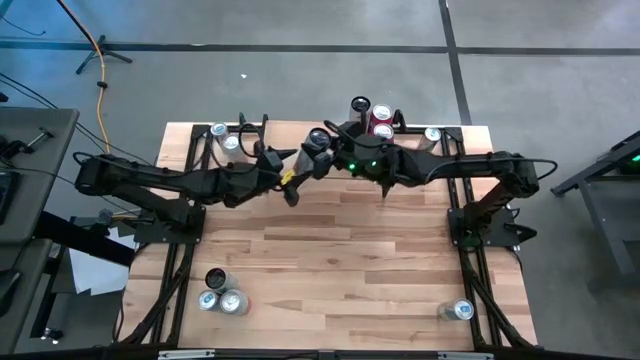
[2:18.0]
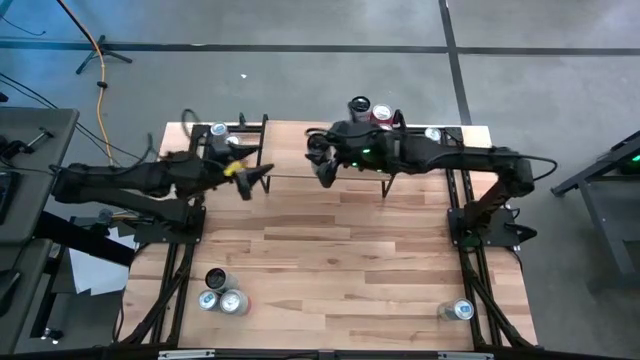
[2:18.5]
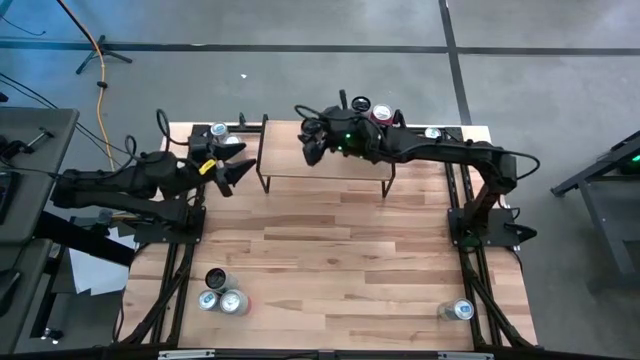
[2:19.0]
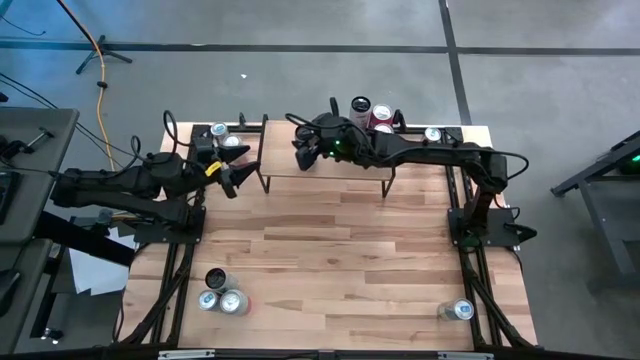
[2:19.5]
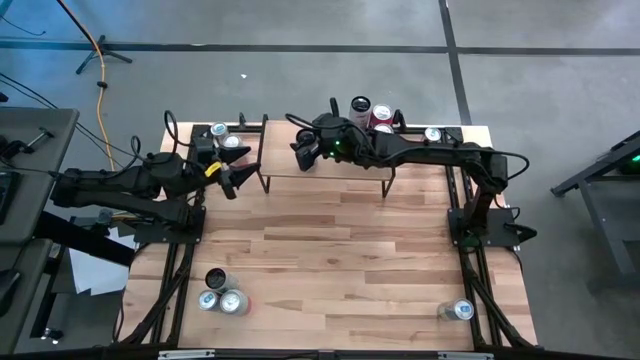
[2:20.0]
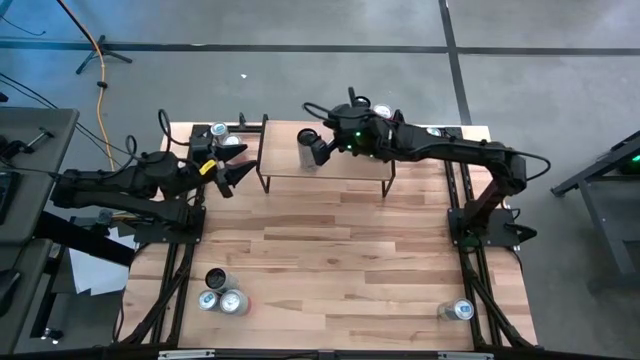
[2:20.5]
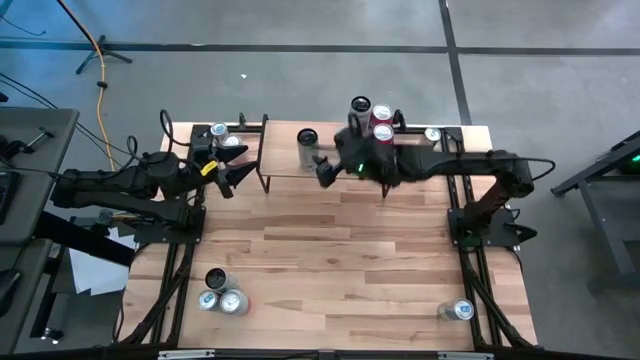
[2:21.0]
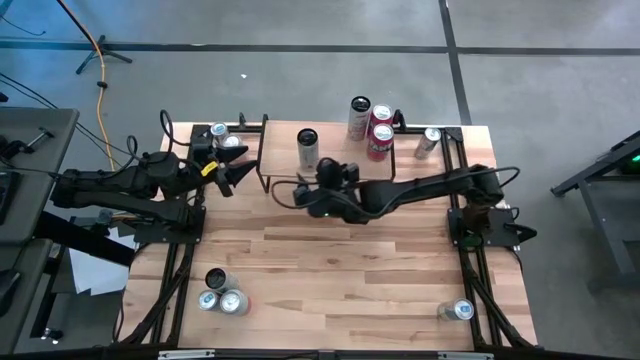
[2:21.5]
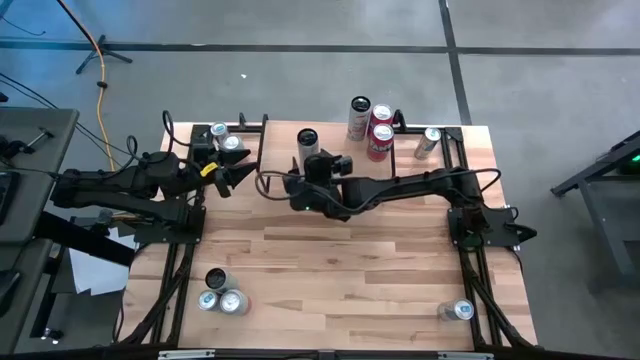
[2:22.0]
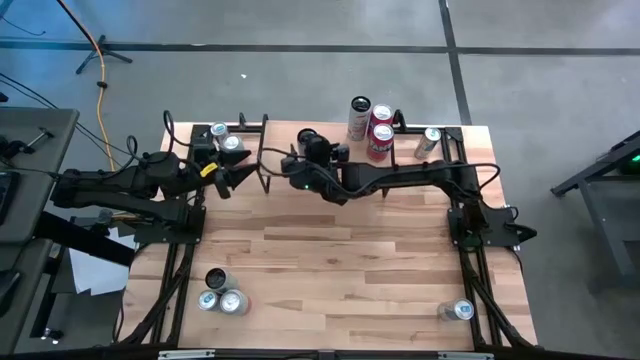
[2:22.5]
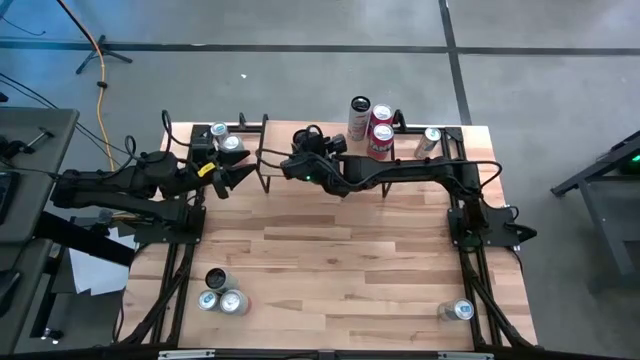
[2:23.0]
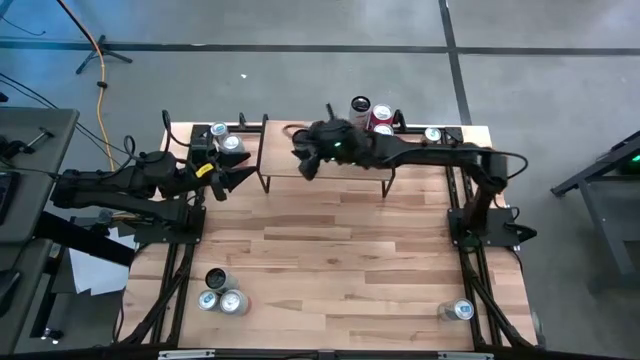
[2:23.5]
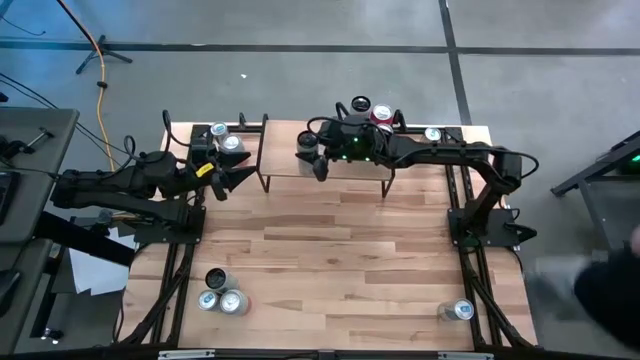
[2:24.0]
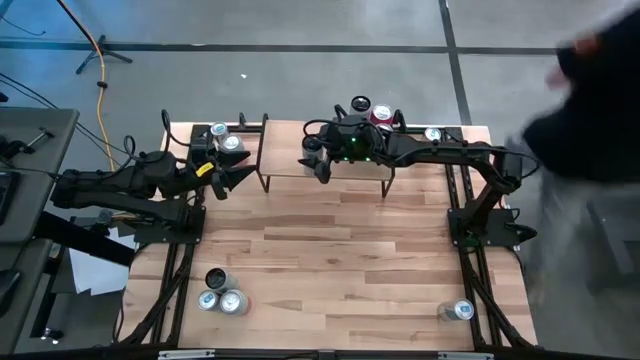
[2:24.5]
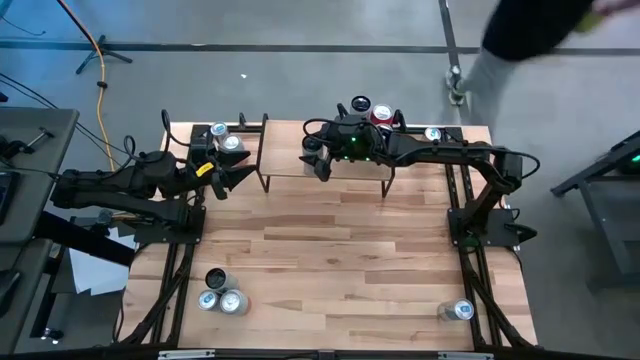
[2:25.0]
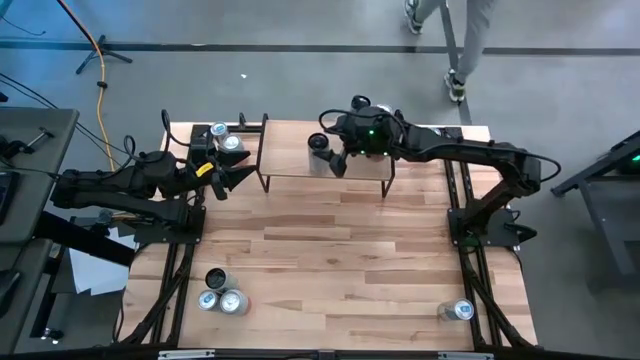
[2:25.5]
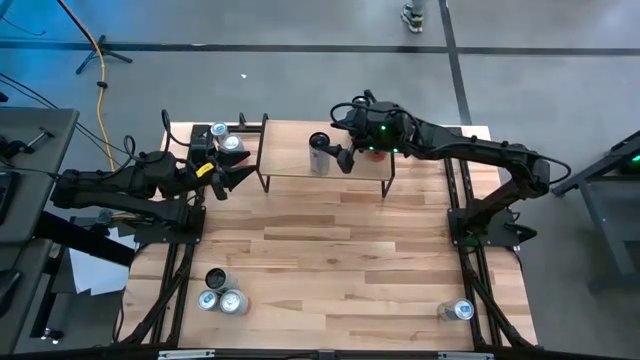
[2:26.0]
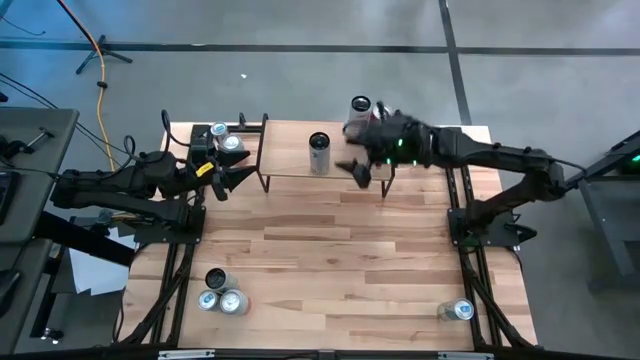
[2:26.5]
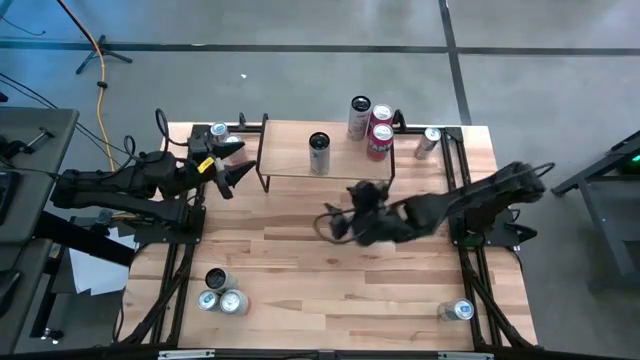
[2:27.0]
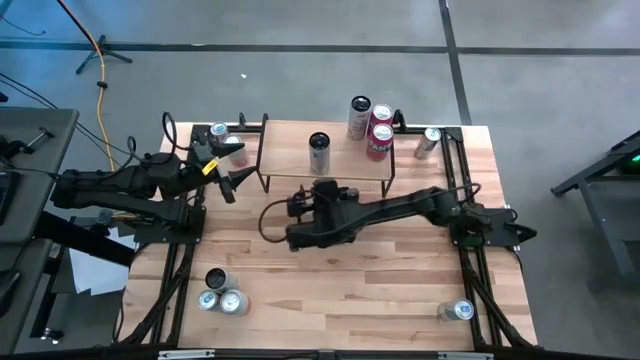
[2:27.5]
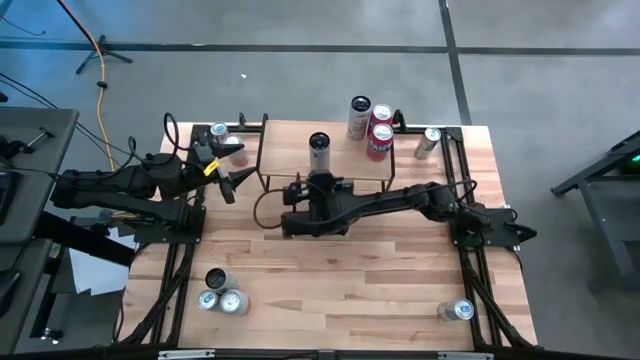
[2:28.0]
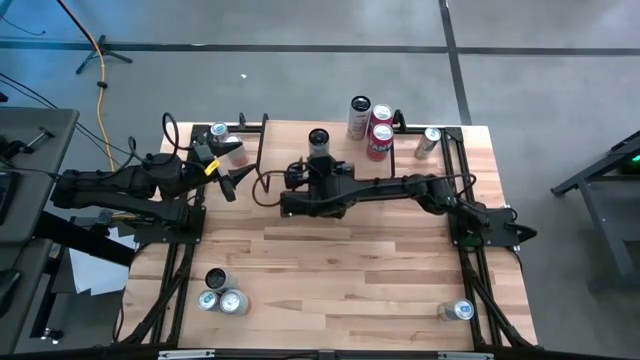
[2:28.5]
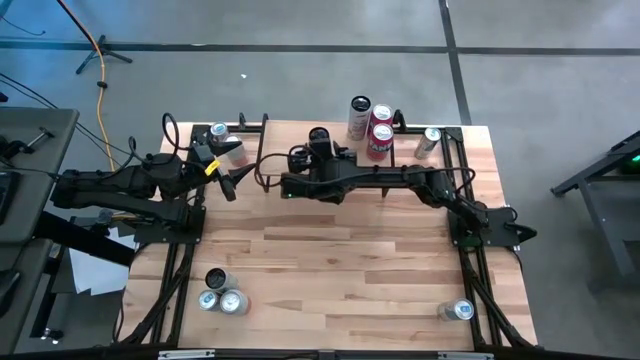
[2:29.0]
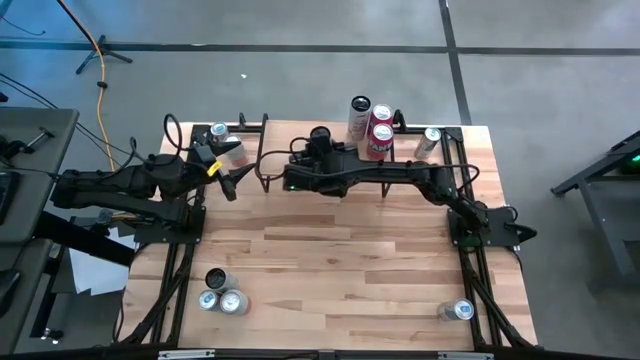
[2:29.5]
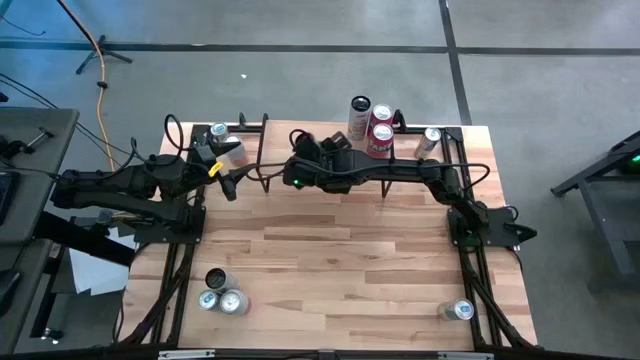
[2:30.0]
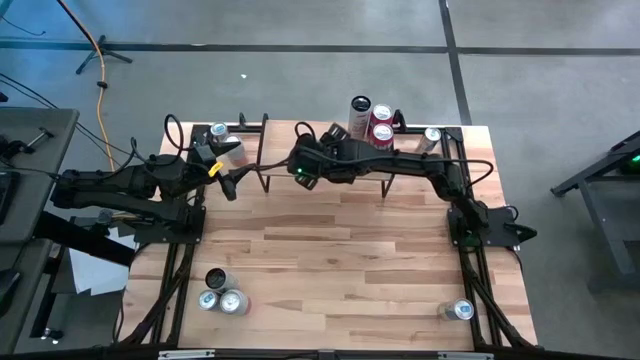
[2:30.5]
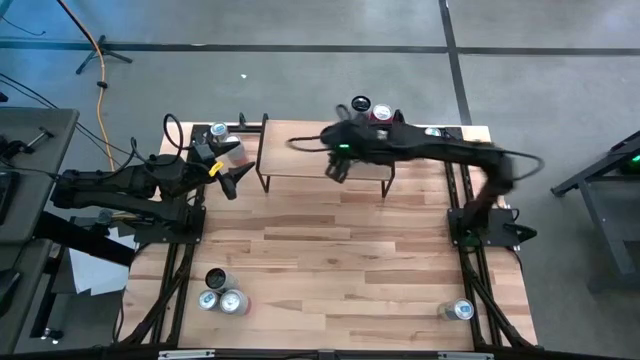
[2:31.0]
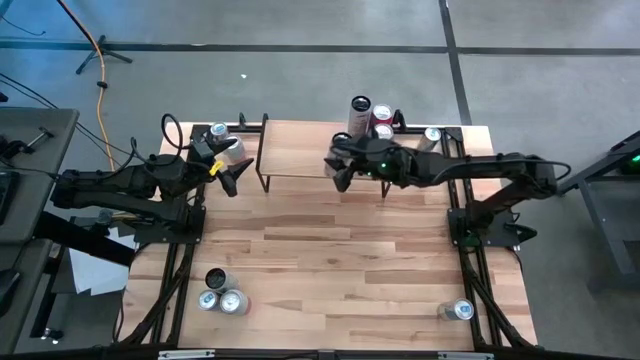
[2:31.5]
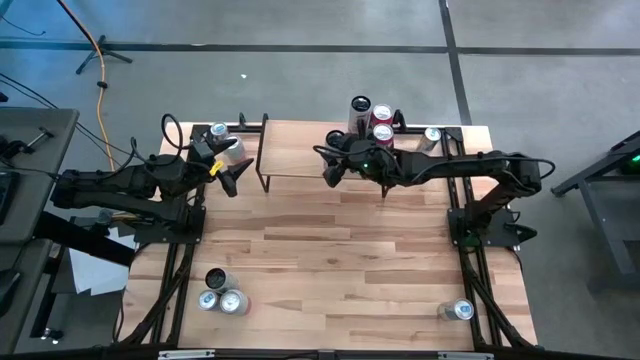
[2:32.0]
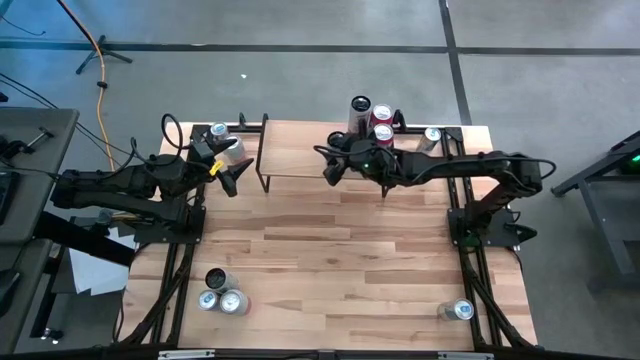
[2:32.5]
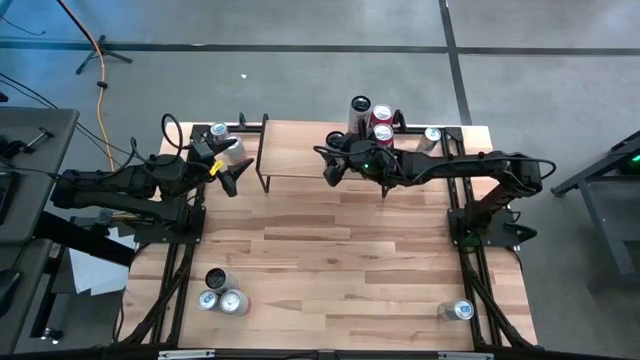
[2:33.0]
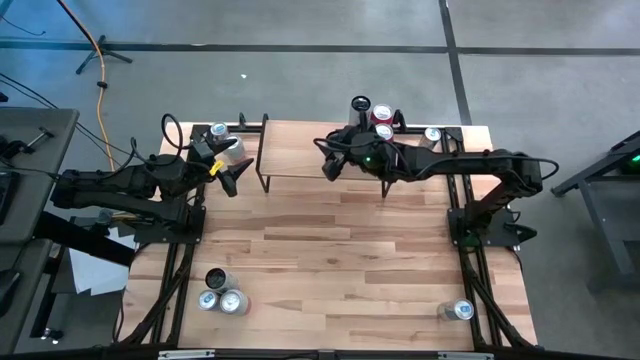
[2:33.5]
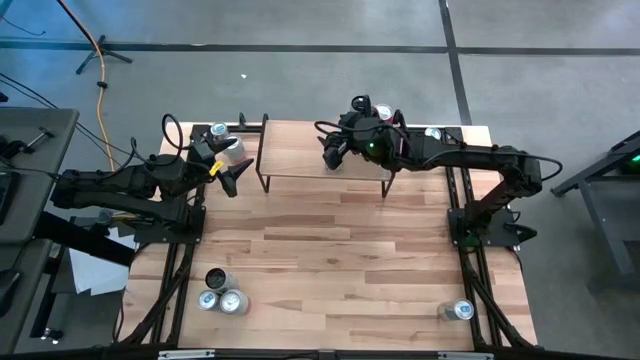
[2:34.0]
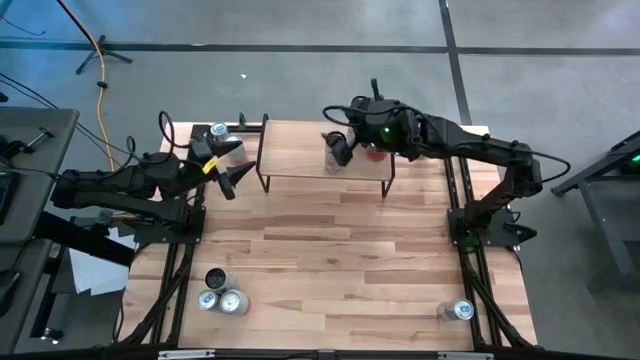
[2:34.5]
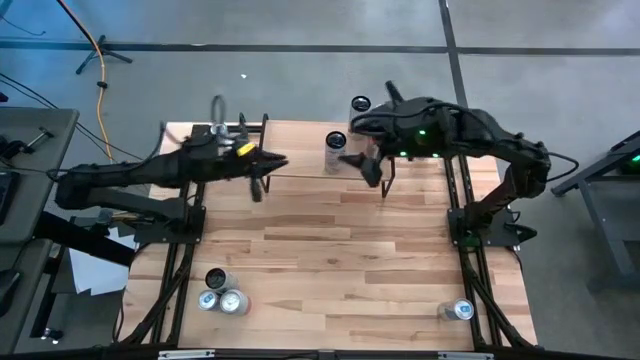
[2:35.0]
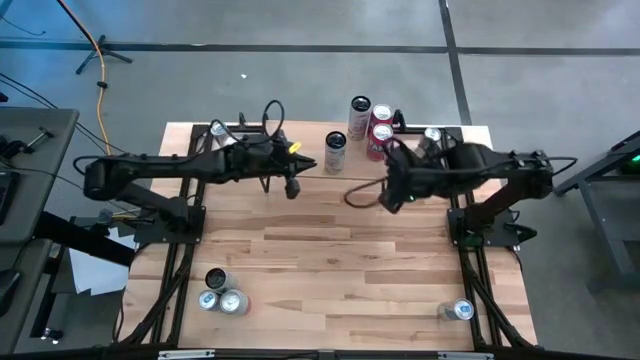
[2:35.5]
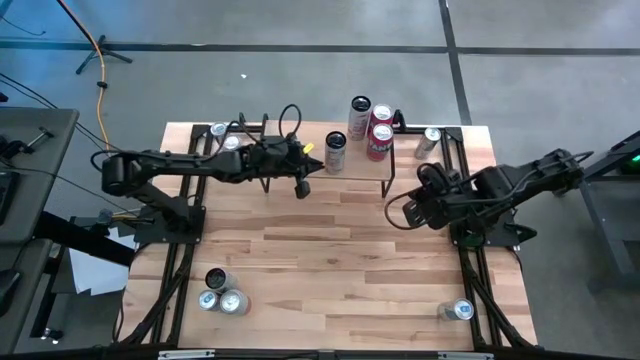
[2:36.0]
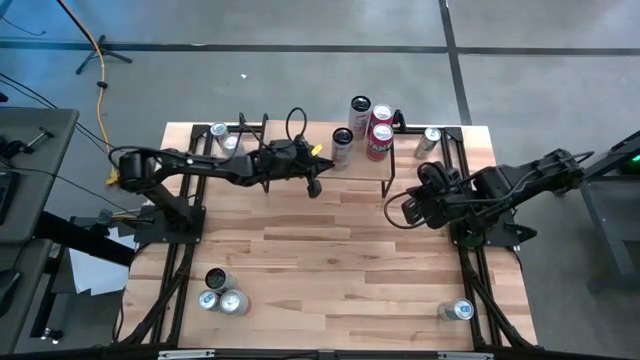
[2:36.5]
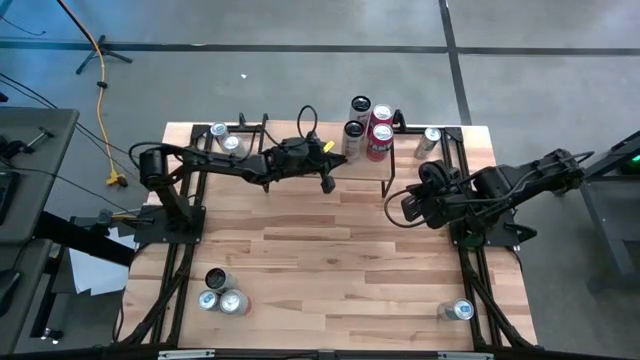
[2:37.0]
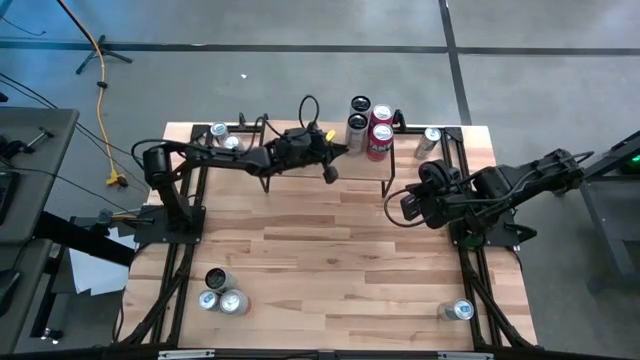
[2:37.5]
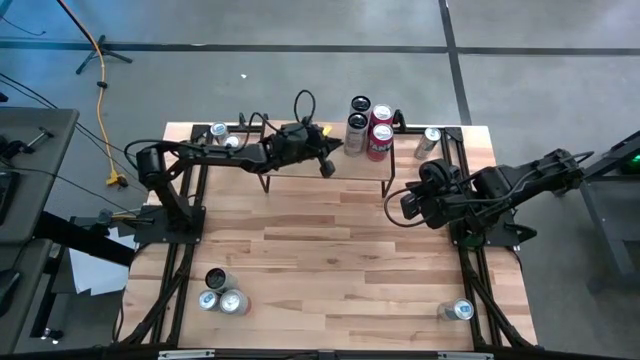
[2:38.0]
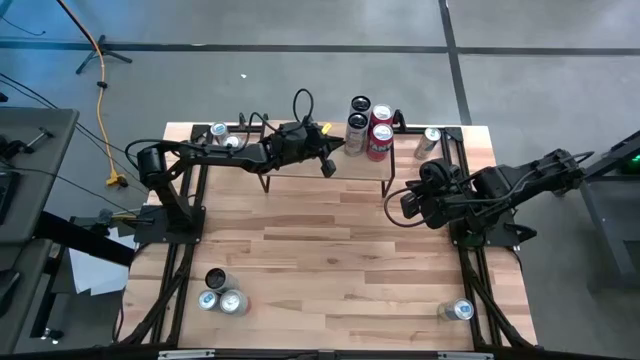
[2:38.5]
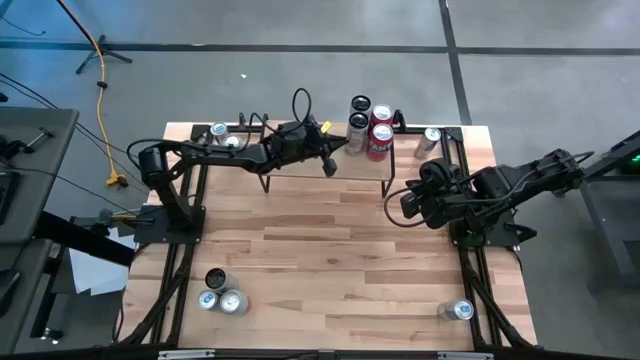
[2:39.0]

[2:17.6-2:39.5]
Task: Place canned beverage on shelf
Put the top white-pink soda can on the shelf aligned with the white-pink soda can
